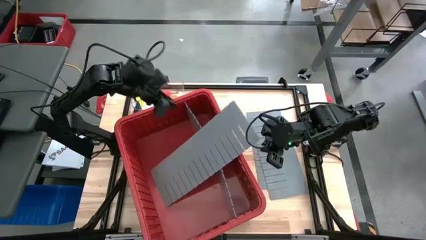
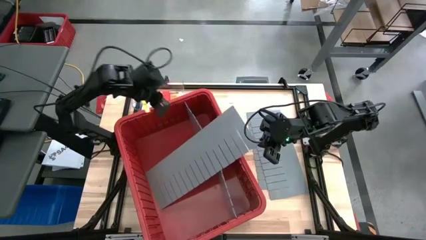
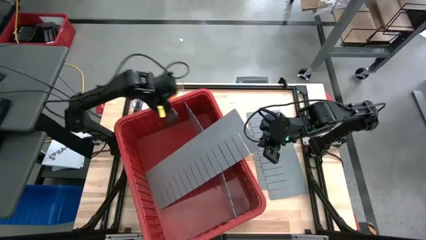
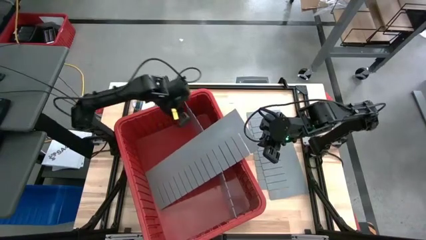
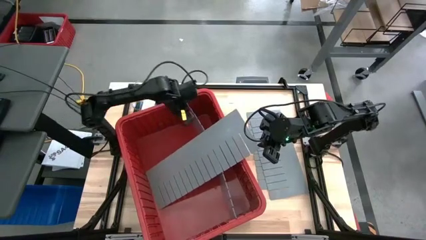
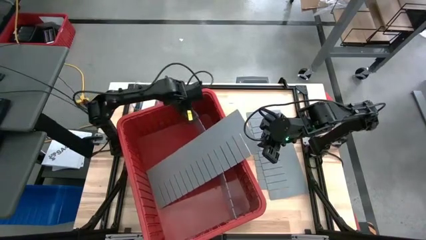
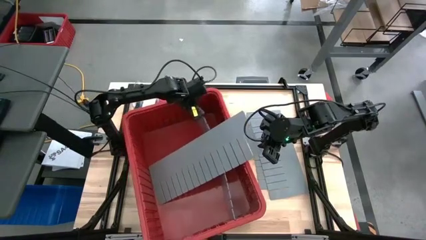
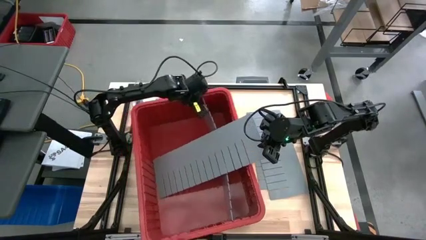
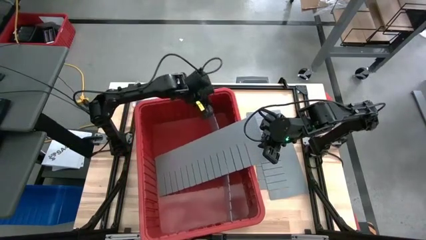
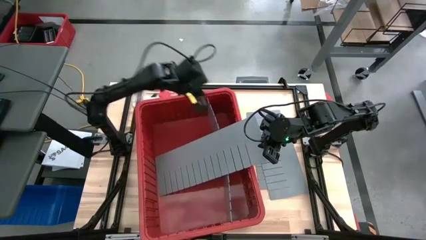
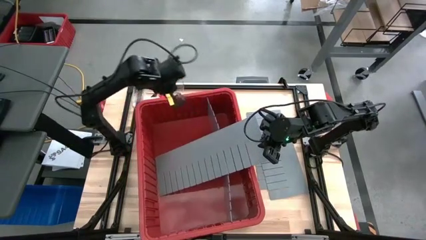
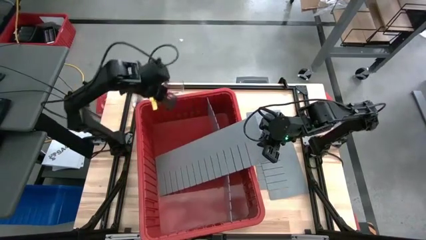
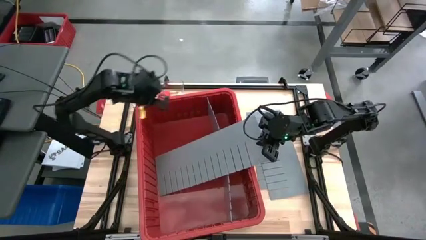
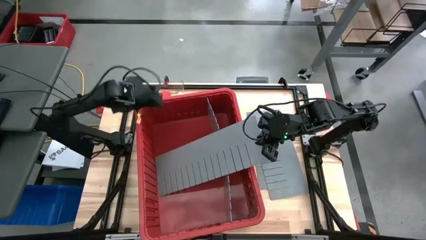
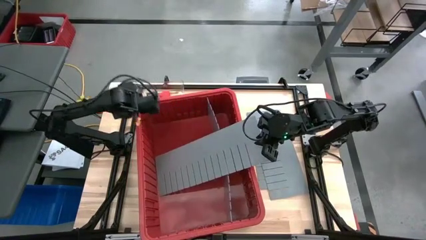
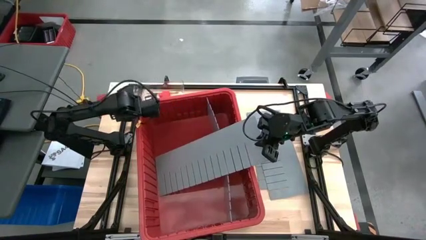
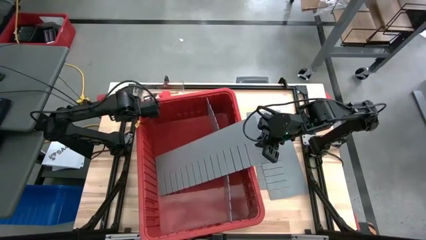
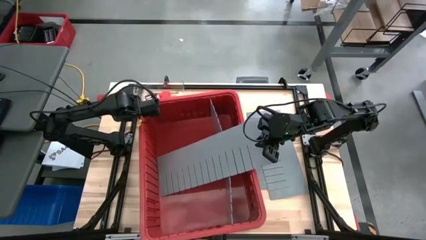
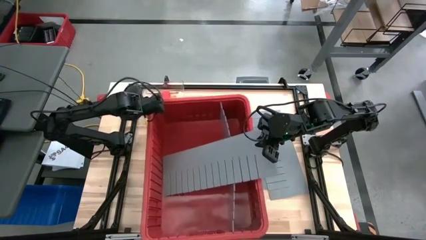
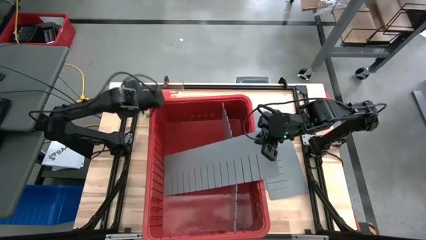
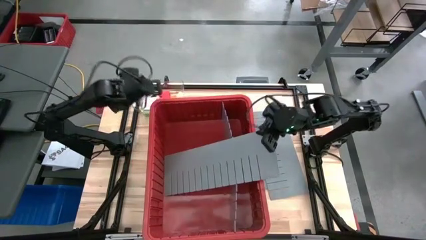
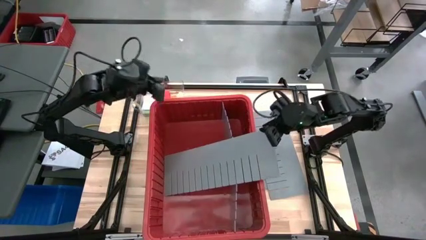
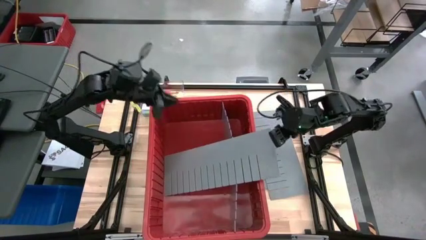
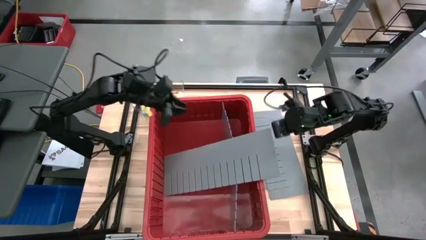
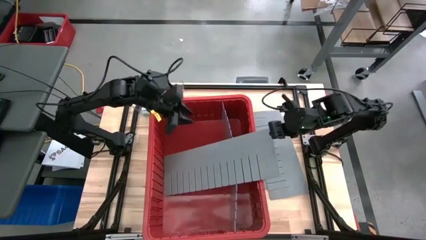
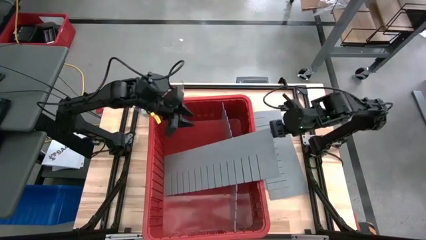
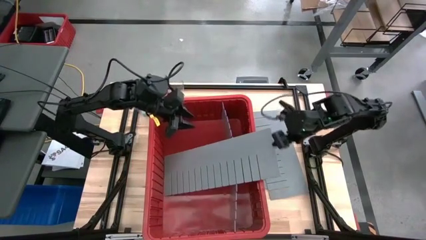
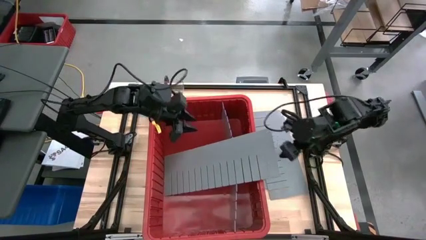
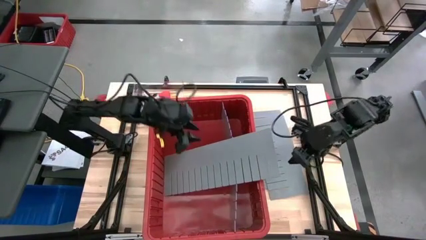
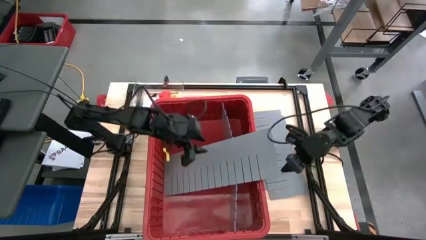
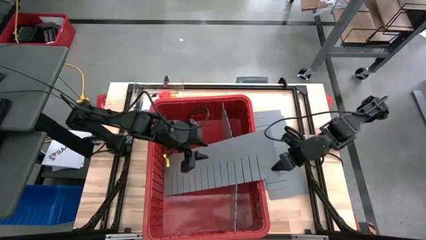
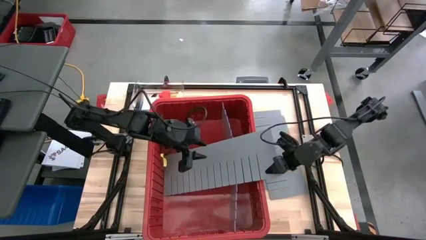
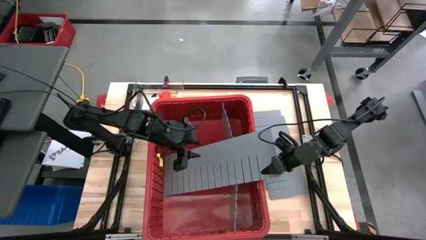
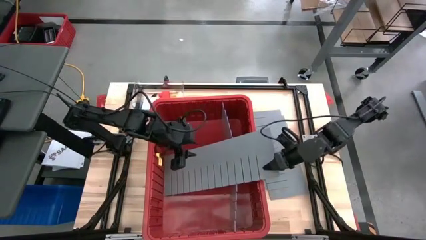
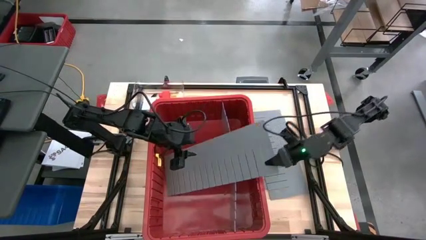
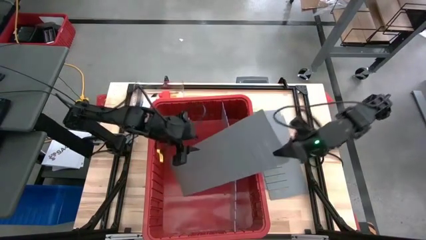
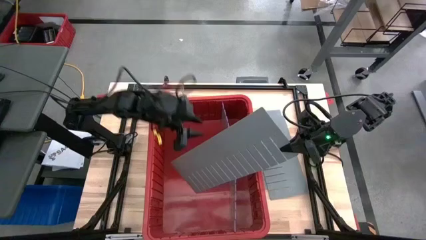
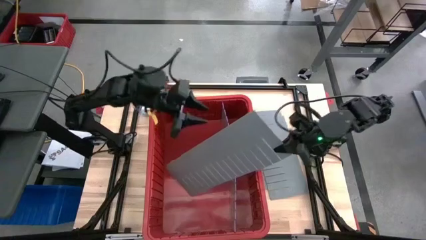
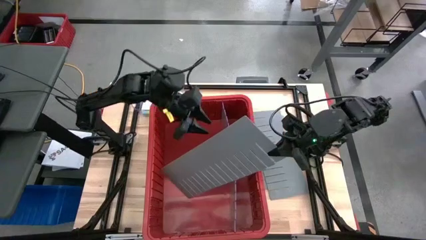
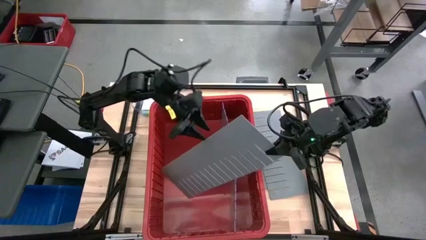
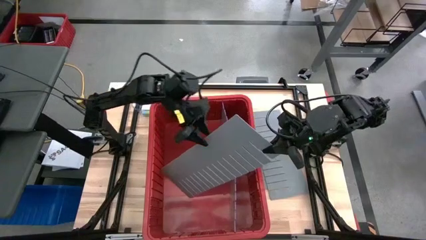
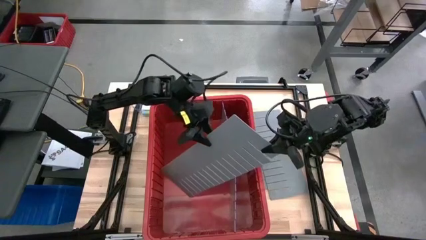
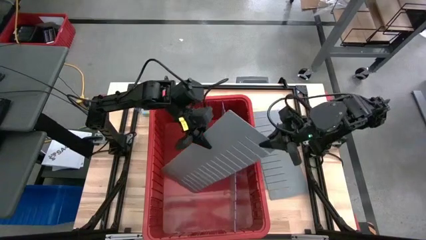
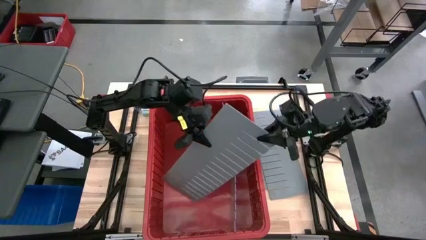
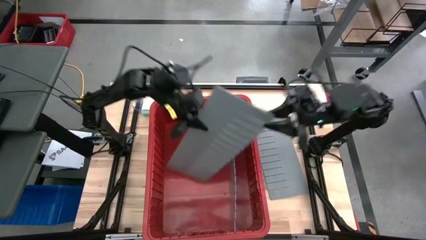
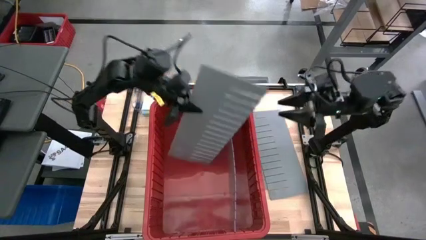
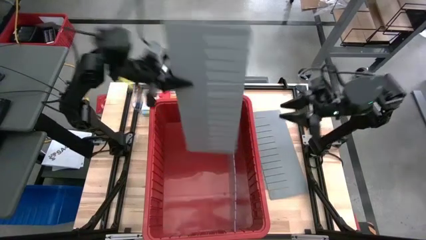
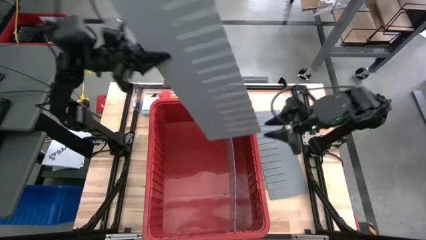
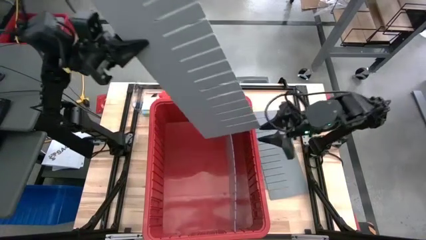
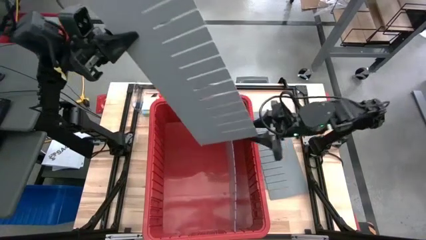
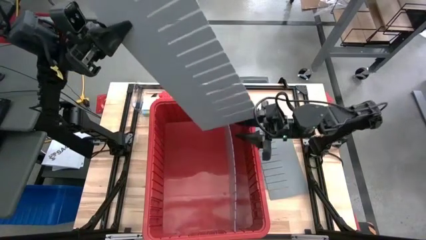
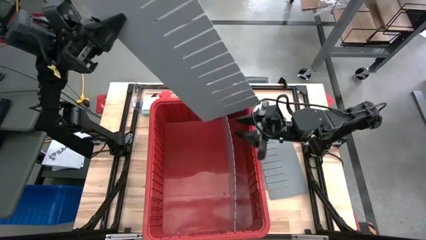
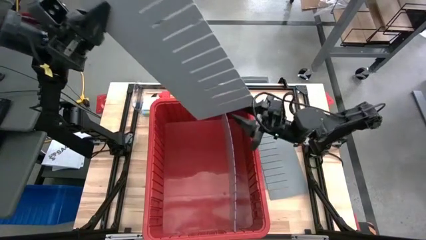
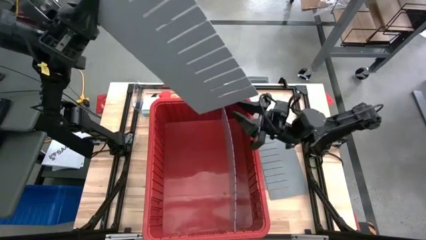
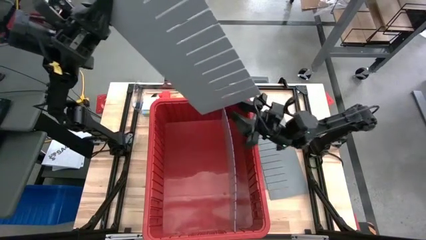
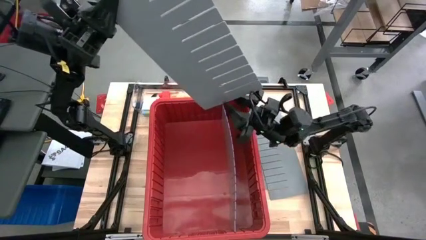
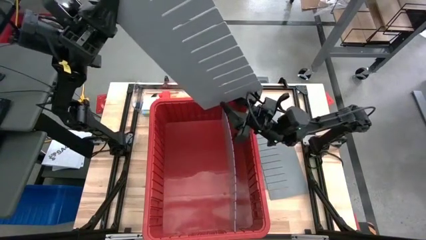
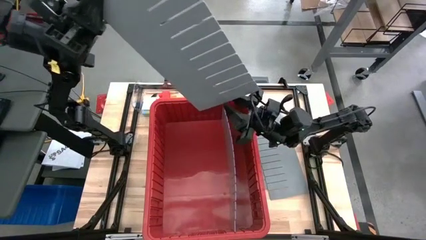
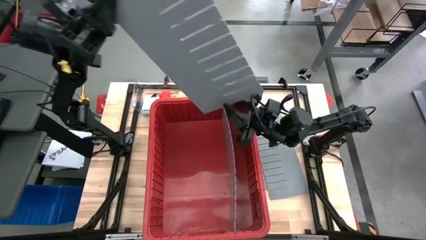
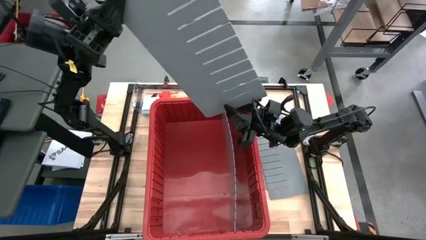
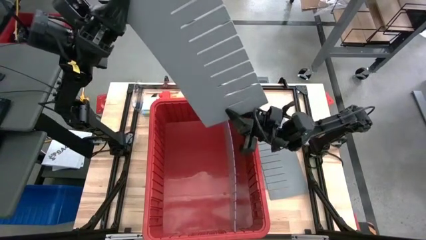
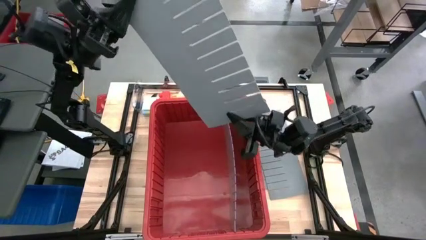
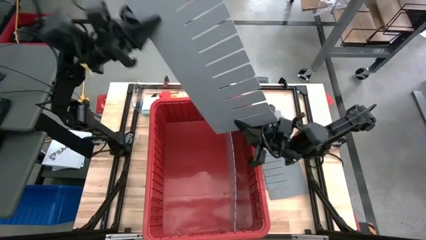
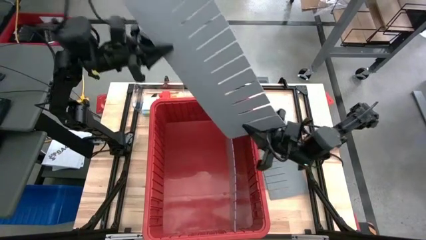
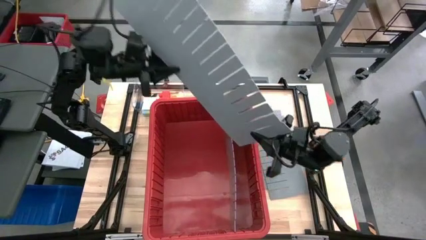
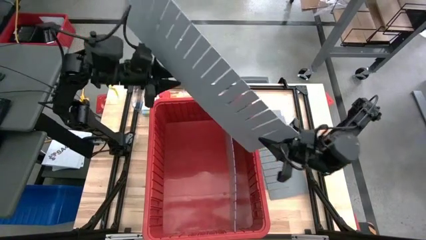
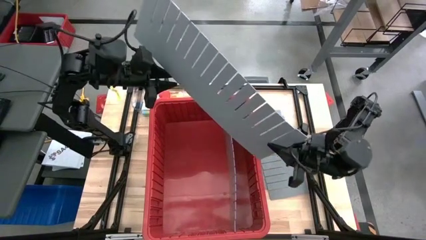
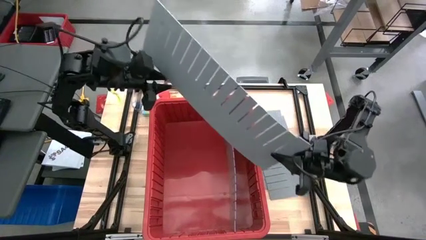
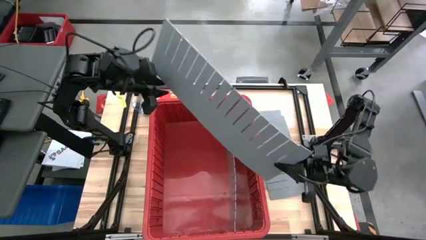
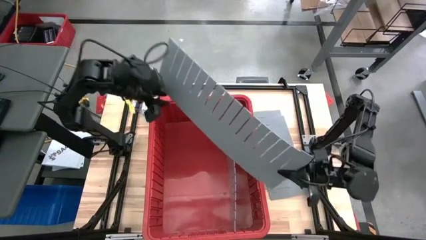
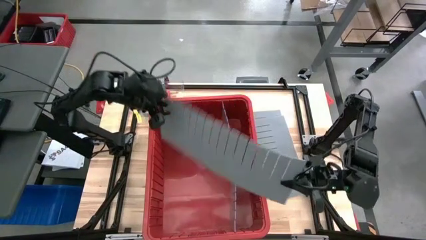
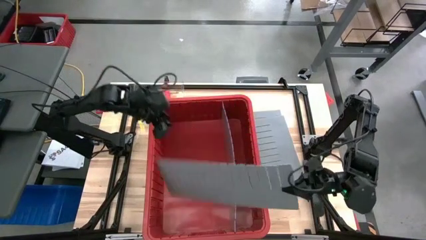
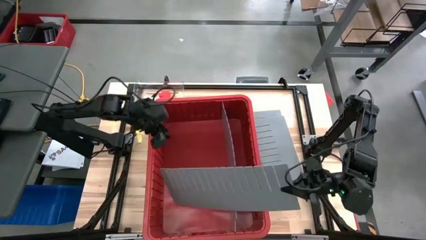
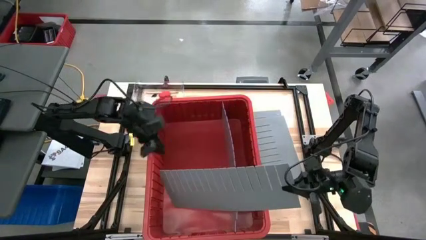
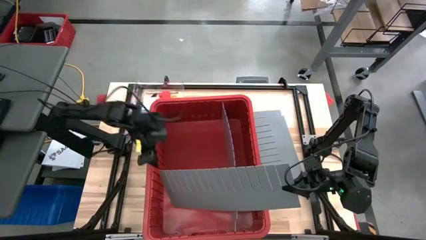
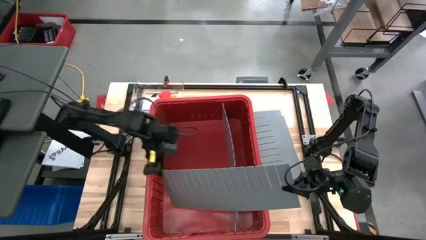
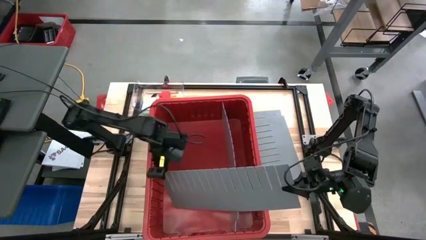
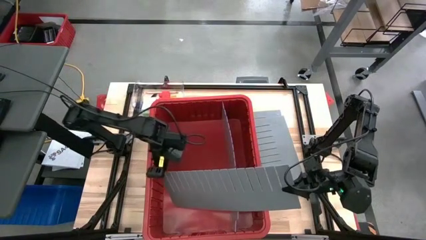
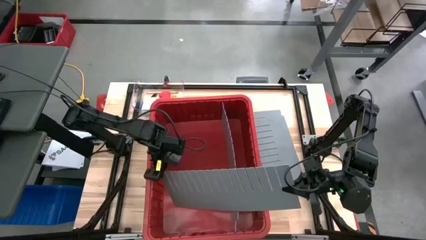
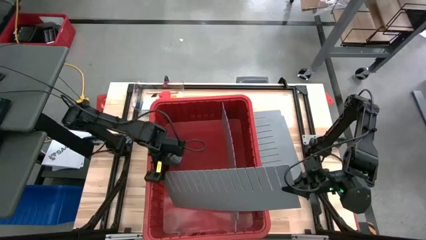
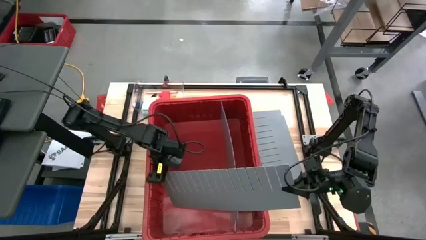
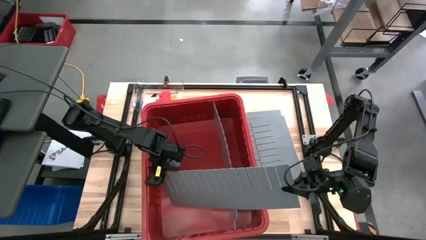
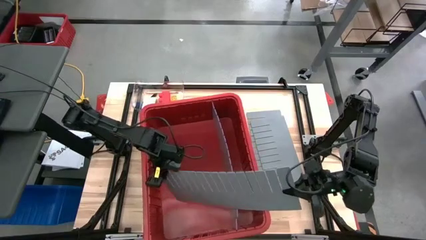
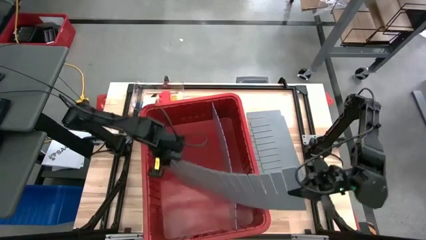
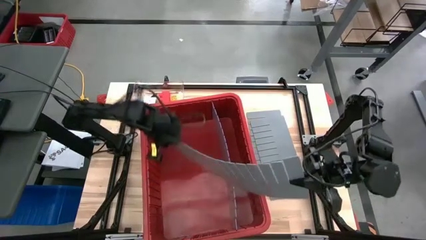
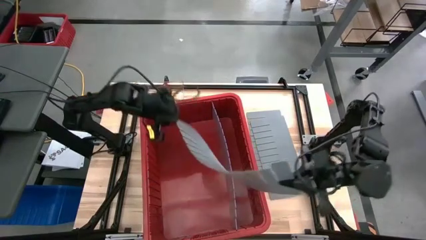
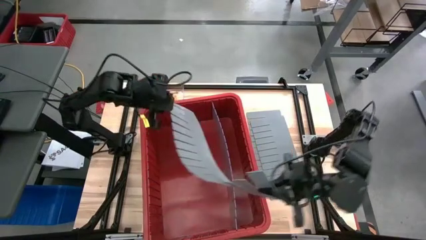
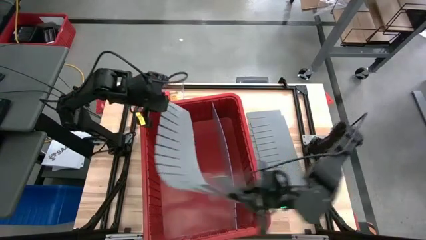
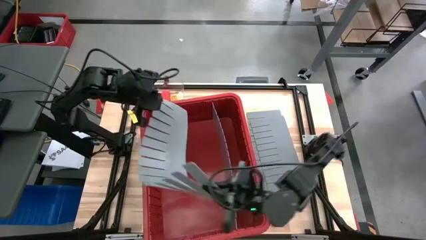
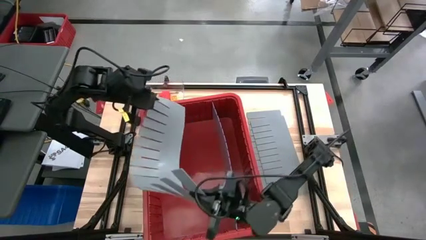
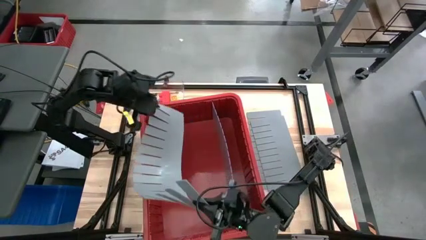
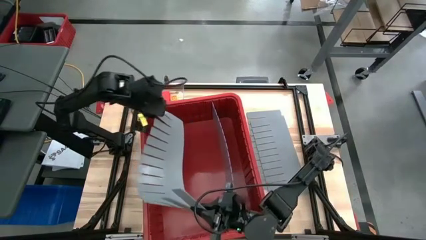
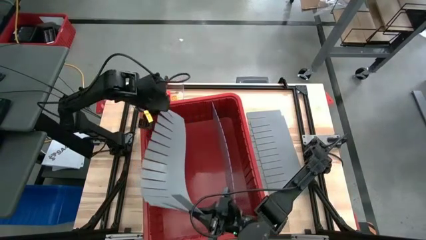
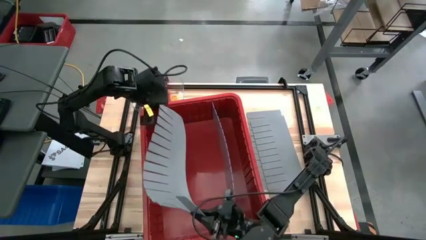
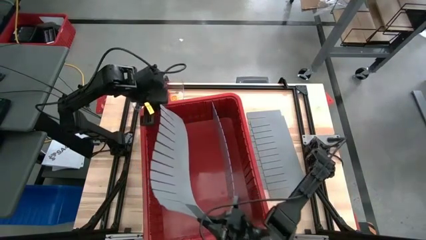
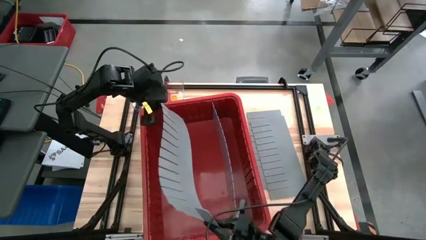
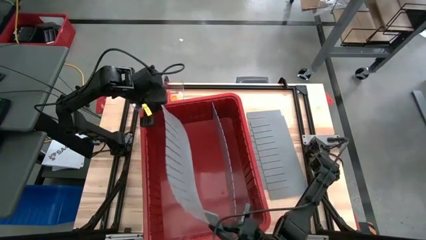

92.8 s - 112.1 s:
Task: Sort blocks
Assemble the bin divider into the red bin
